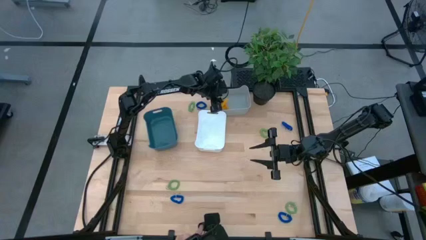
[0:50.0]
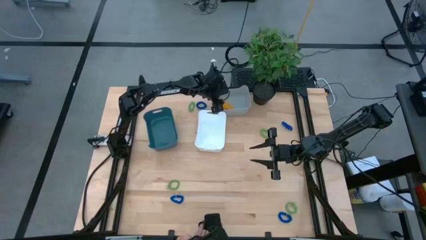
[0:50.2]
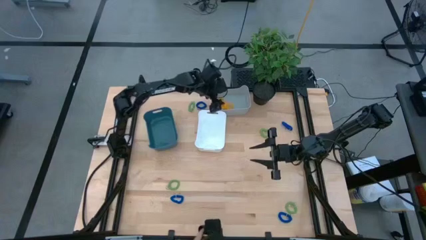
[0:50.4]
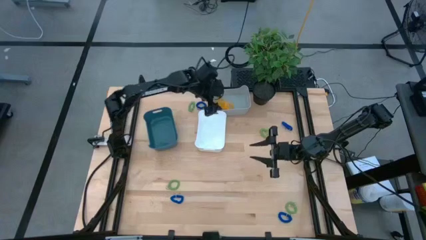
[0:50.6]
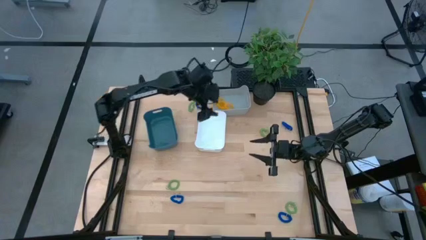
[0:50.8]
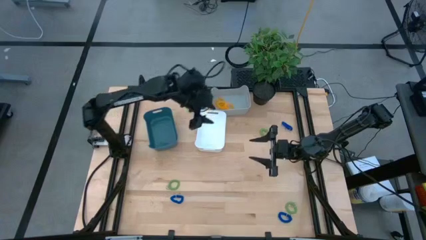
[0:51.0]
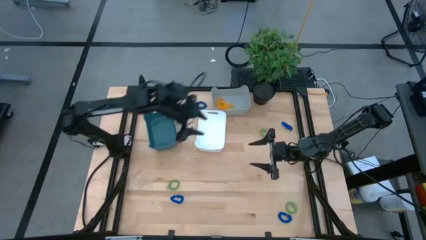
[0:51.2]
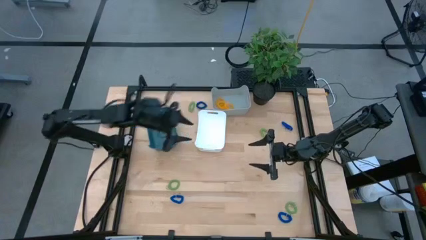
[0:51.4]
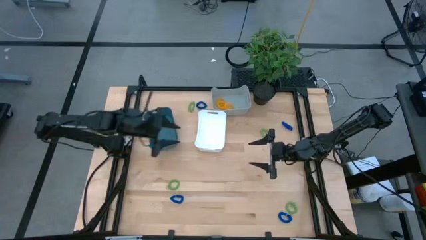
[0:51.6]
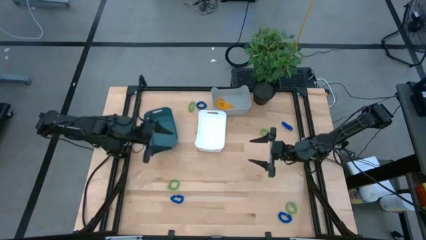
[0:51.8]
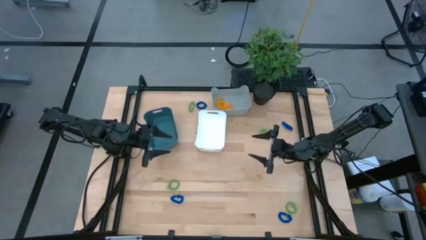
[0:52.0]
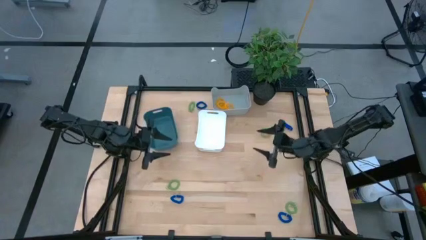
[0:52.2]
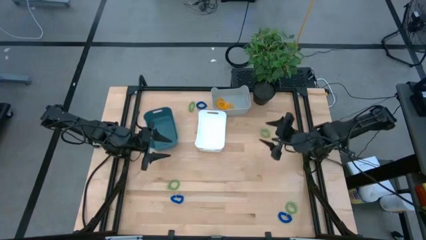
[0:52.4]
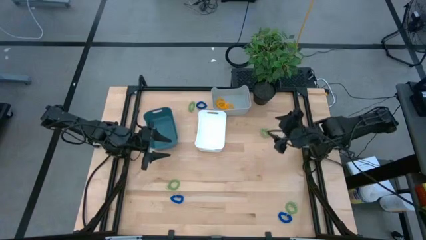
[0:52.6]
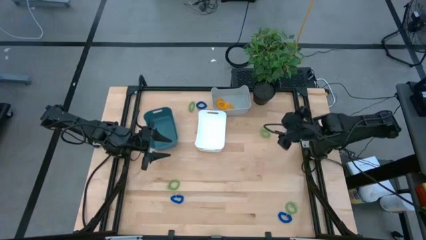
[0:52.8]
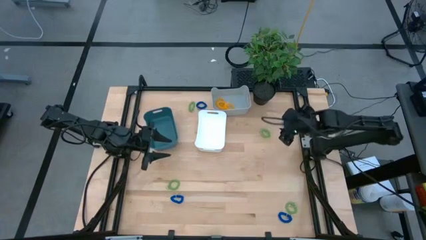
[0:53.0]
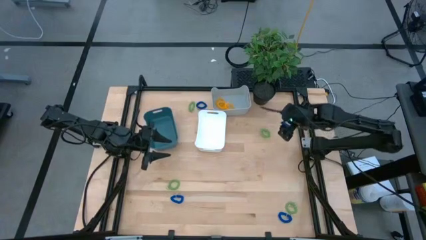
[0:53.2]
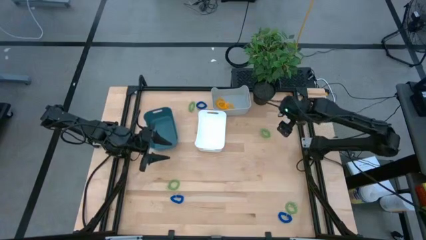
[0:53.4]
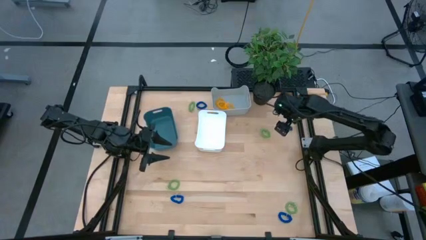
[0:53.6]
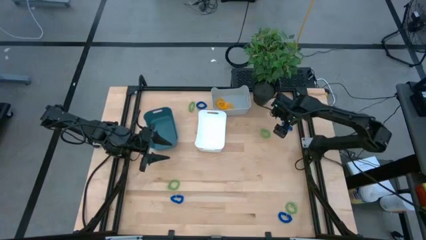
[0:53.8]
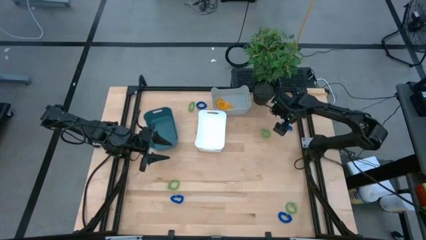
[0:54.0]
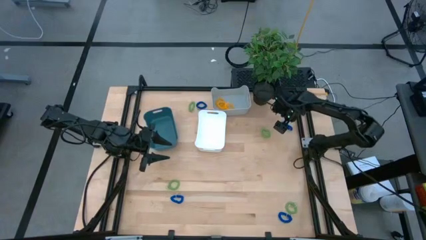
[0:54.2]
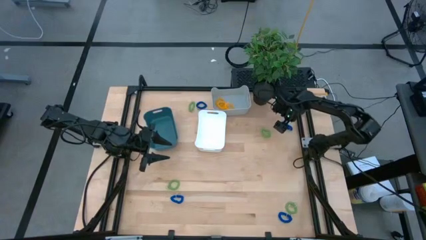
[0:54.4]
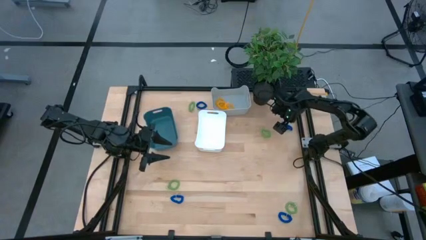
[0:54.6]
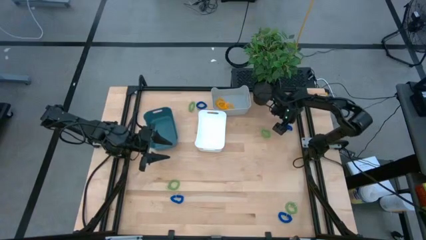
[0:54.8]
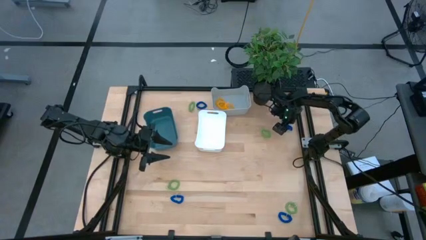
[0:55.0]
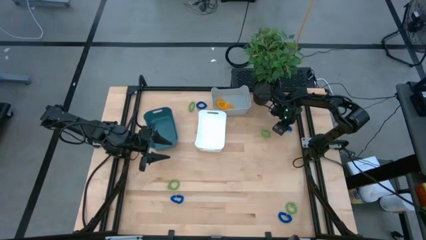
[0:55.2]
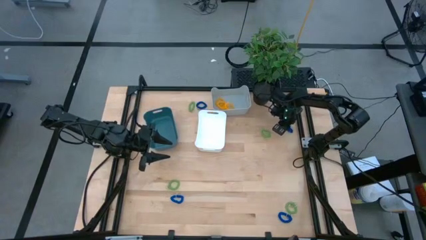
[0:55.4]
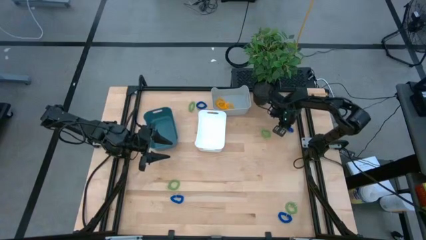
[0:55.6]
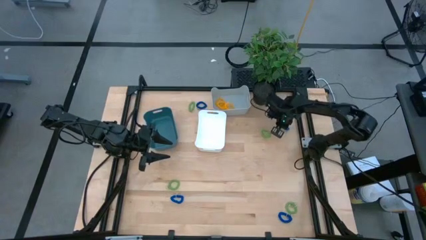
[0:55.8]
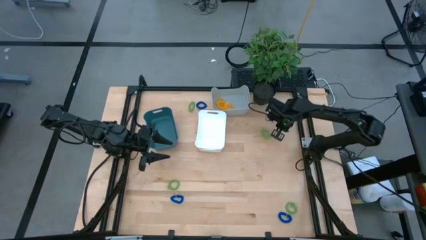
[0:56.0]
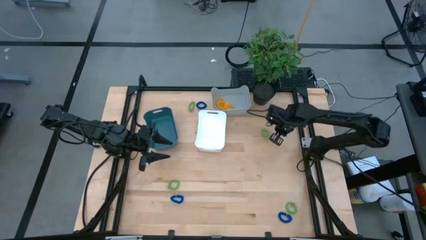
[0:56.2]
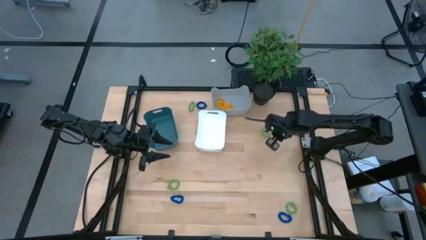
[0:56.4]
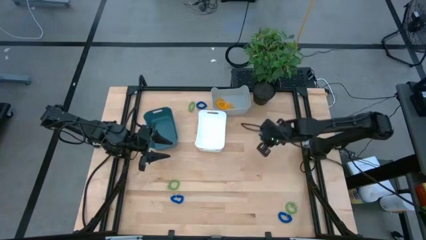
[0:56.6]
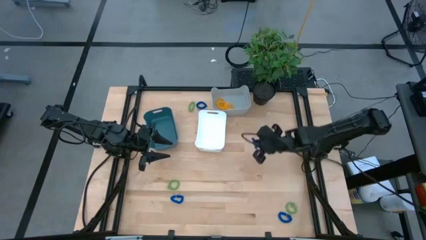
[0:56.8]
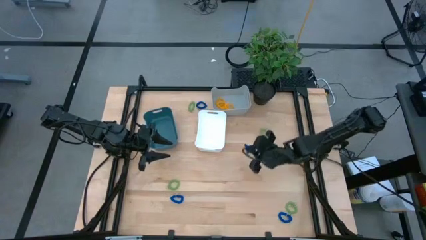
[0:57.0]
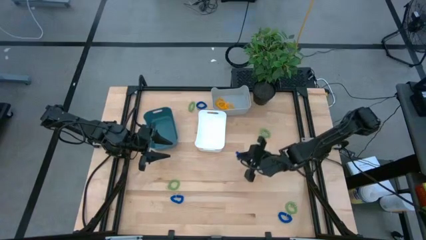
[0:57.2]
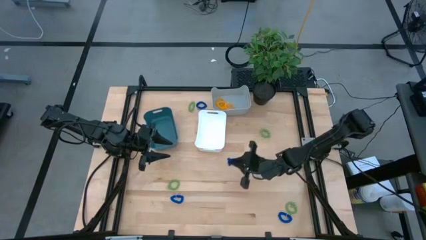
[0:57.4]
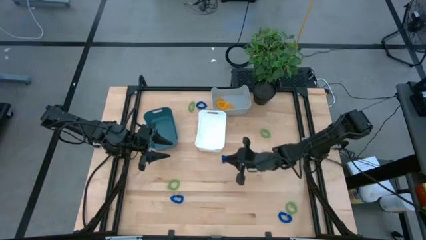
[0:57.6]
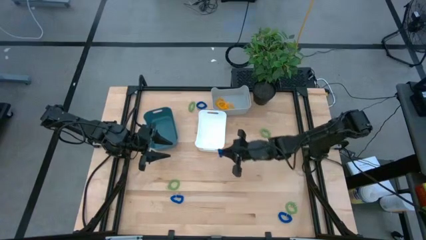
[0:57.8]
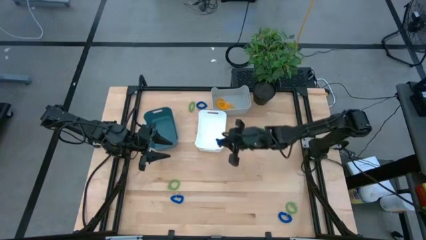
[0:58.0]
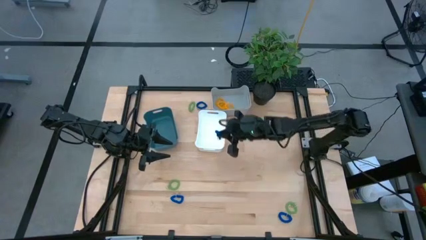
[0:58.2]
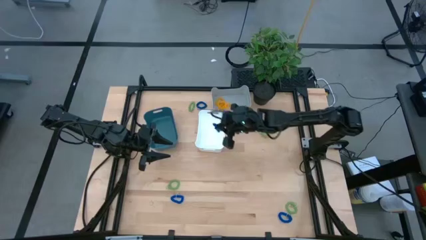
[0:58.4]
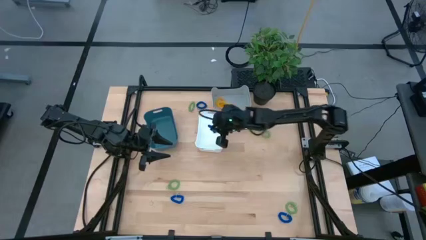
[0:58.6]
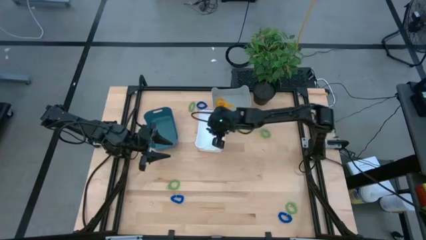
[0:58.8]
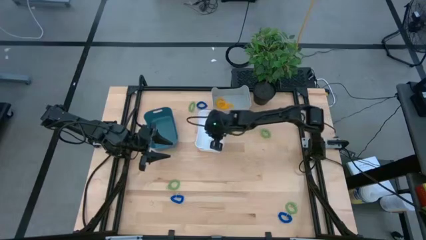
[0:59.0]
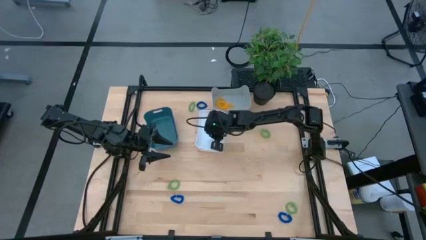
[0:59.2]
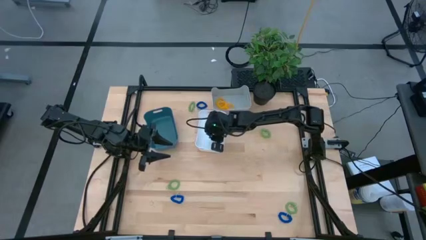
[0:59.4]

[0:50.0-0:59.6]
Task: Sort spring keychains
Put the blue spring keychain into the white bin

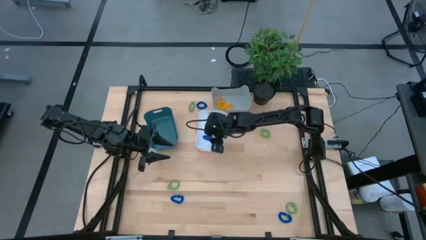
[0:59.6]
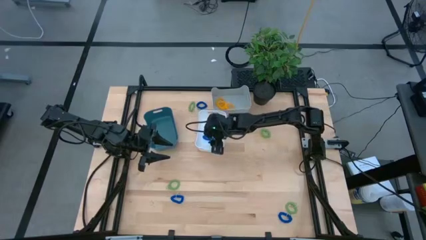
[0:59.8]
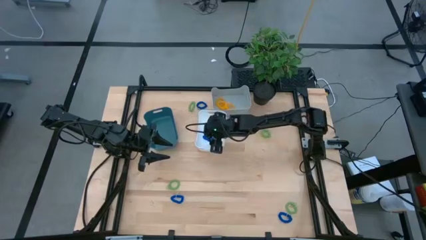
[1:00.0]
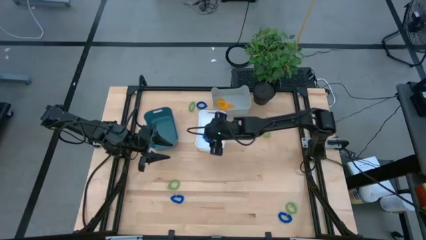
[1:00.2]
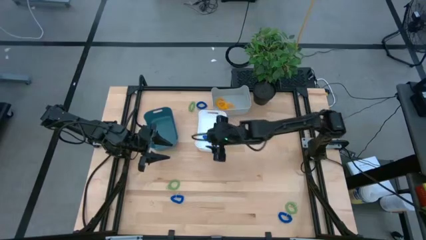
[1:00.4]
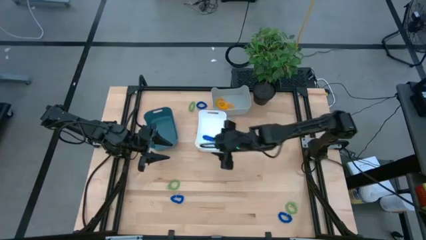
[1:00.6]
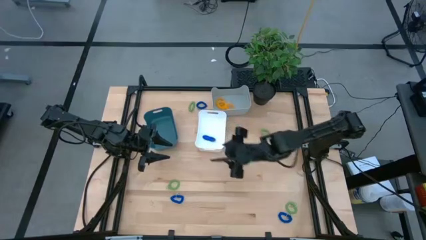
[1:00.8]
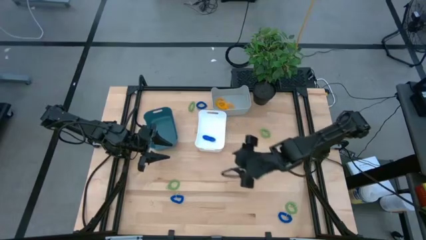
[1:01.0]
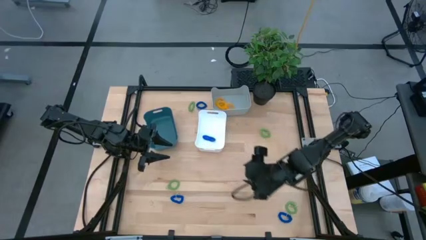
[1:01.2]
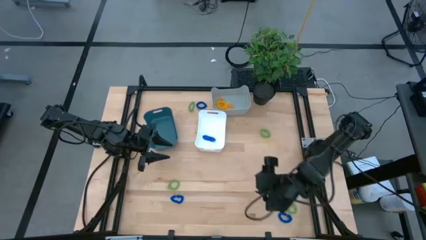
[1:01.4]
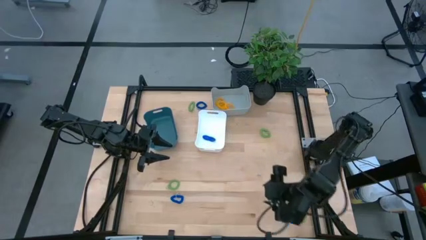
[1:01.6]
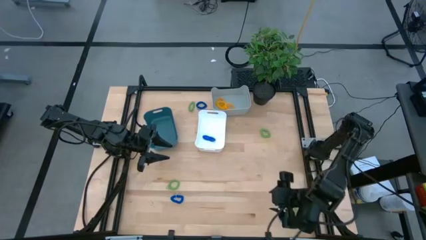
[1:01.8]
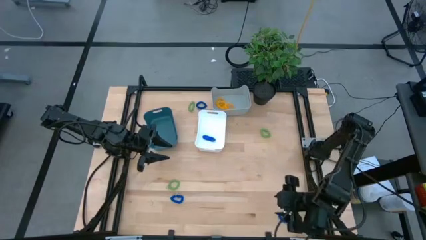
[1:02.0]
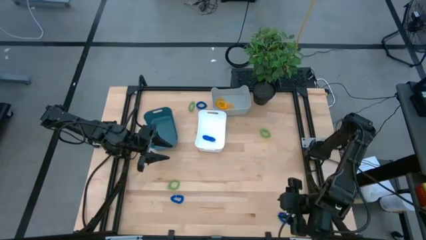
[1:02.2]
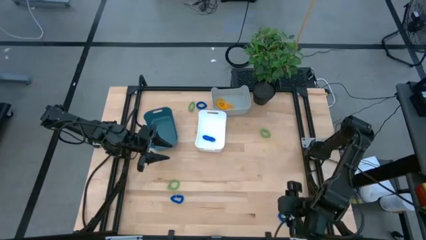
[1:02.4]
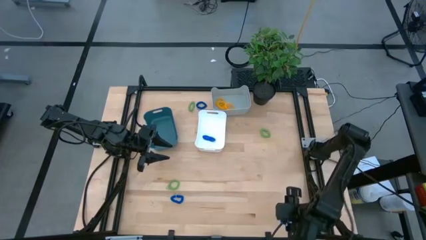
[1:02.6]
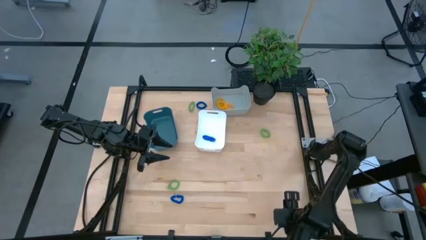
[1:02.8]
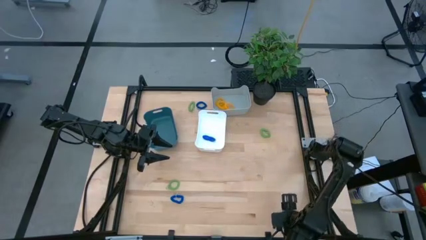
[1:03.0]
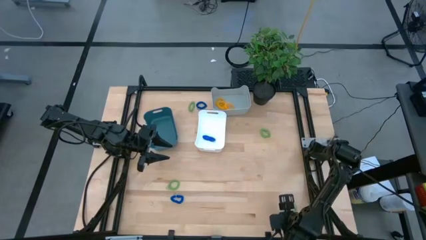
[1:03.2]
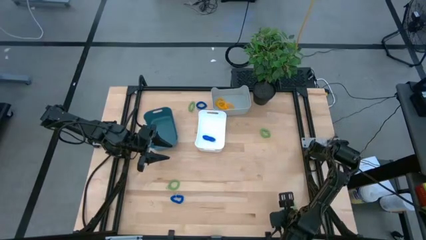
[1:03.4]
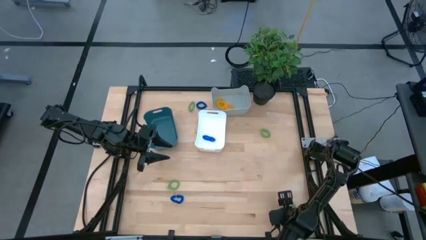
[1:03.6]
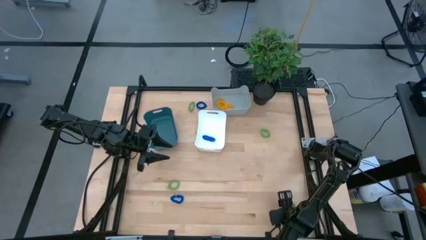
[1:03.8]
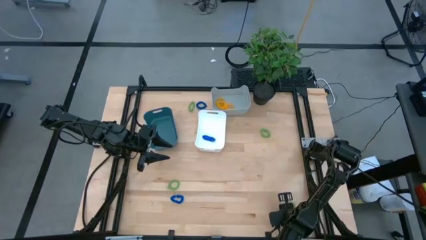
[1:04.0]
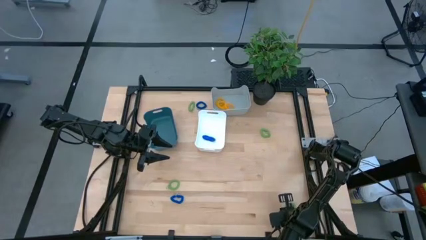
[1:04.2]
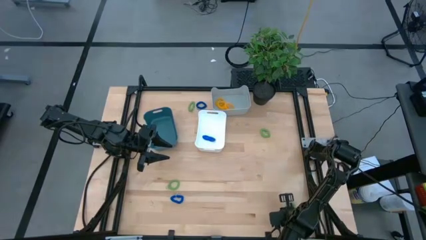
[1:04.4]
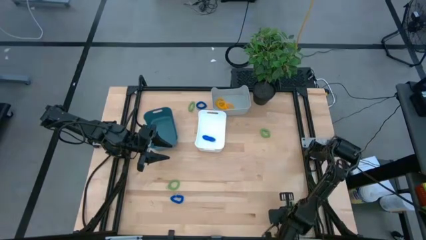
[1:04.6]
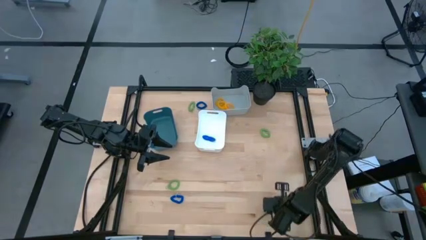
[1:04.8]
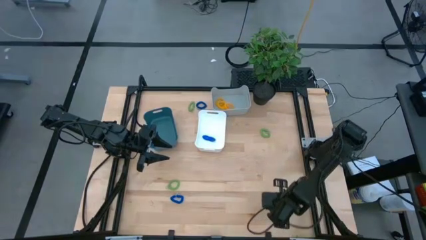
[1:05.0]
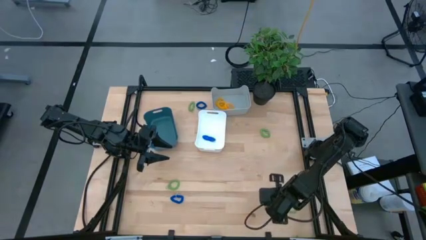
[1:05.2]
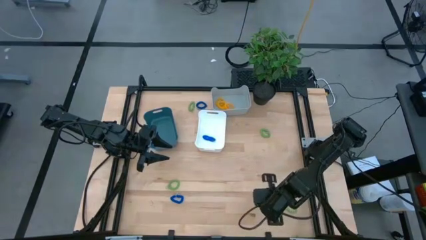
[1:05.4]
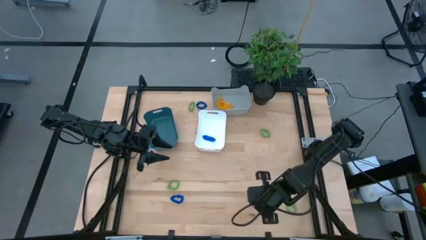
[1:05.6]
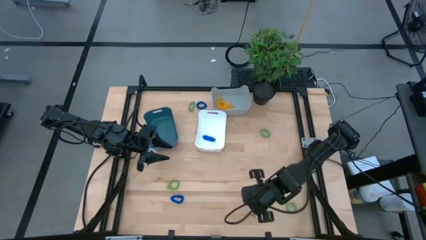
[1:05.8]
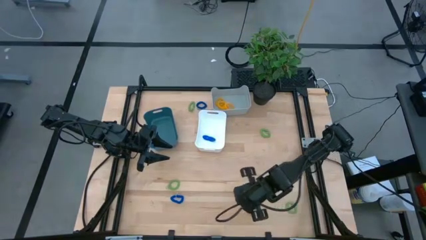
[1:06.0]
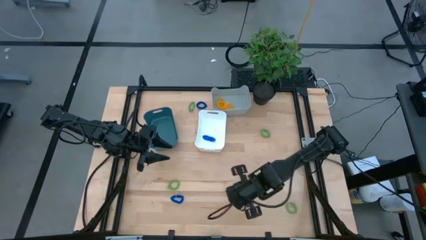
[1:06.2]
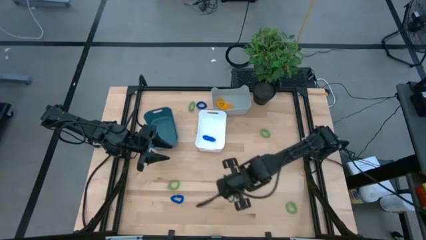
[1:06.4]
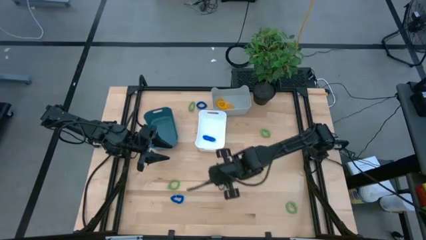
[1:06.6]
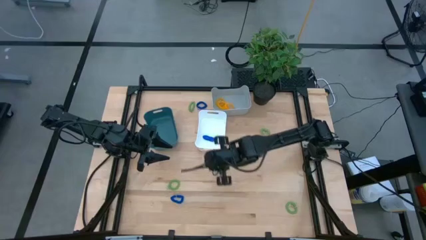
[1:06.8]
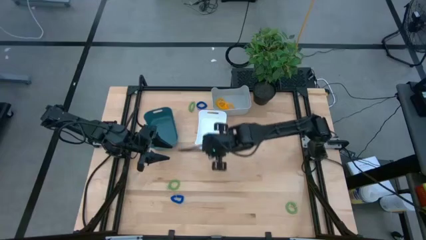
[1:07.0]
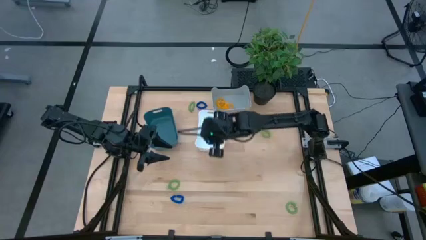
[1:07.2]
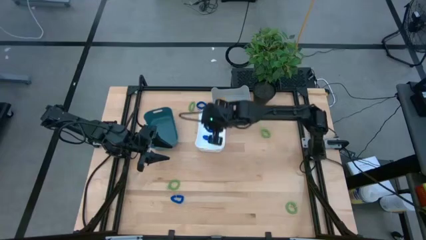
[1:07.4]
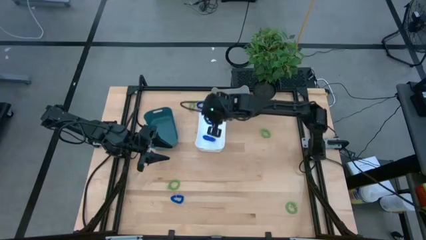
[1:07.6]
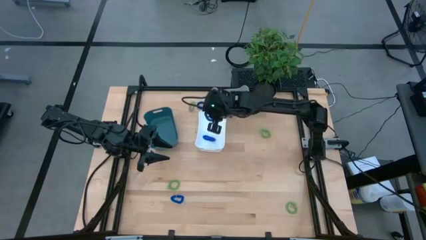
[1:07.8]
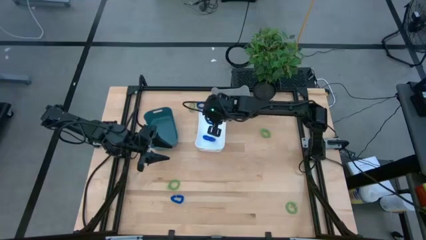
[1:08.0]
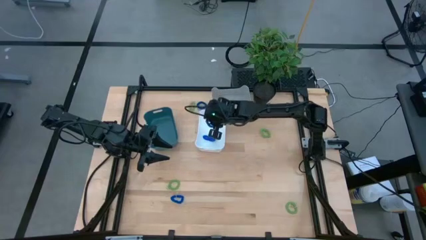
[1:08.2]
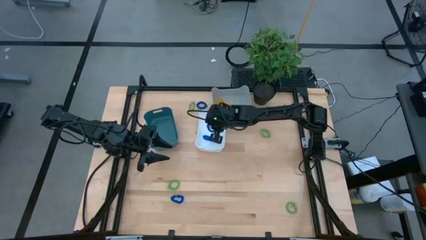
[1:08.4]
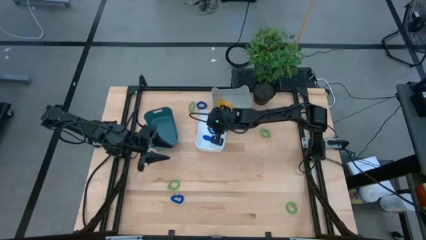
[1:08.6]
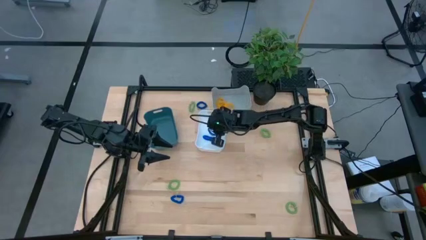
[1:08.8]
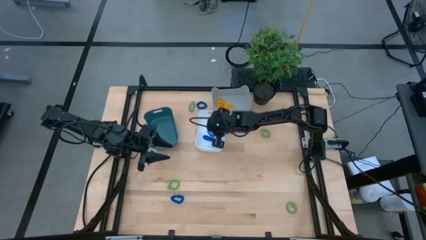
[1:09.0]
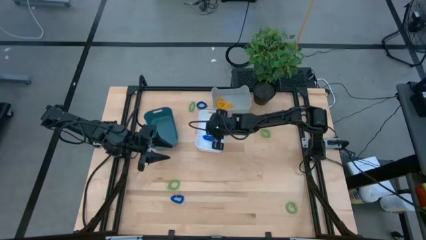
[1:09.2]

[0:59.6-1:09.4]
Put the blue spring keychain into the white bin
